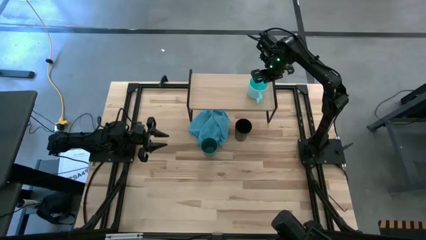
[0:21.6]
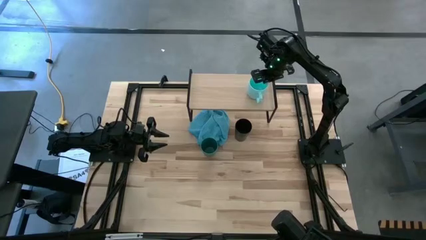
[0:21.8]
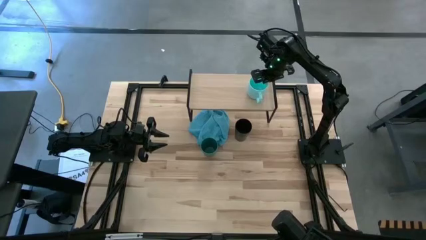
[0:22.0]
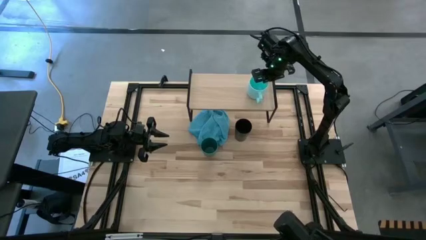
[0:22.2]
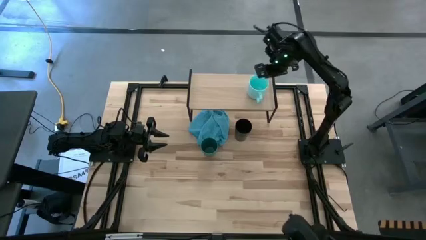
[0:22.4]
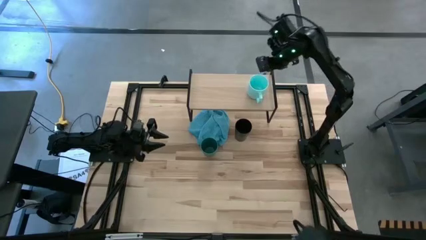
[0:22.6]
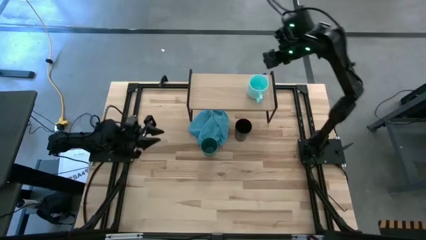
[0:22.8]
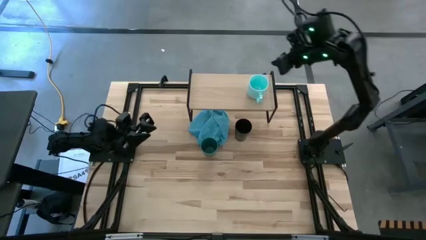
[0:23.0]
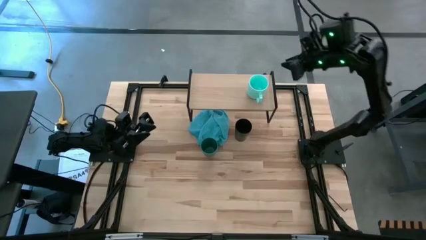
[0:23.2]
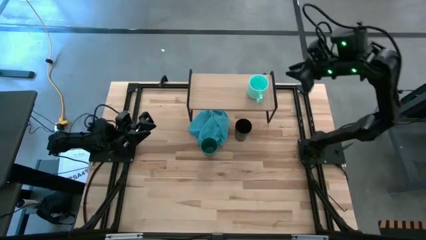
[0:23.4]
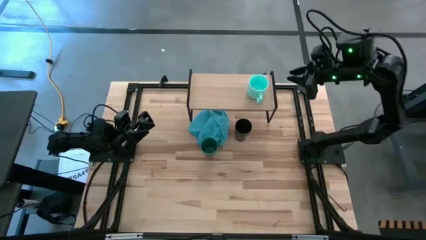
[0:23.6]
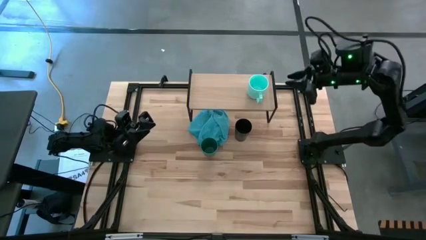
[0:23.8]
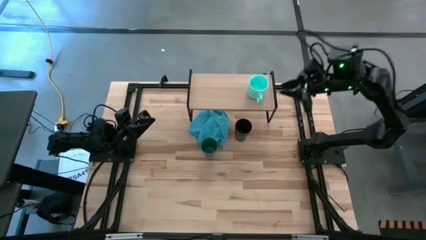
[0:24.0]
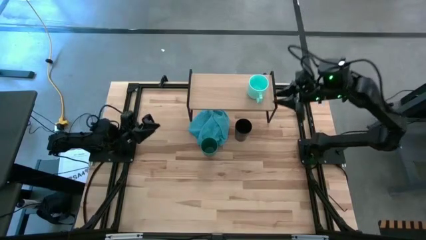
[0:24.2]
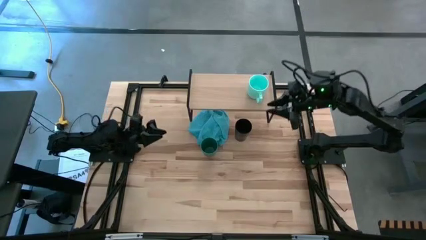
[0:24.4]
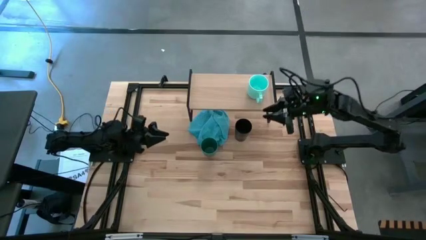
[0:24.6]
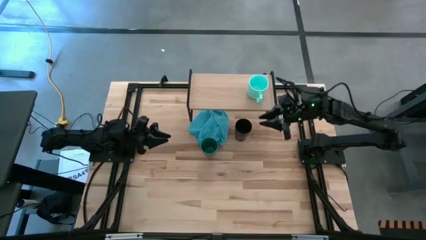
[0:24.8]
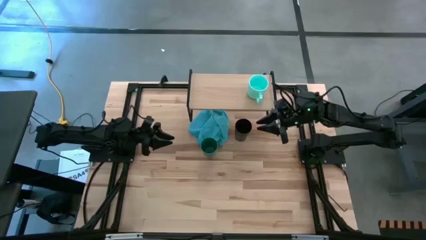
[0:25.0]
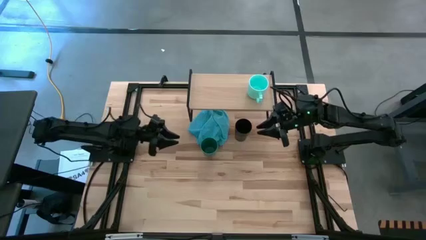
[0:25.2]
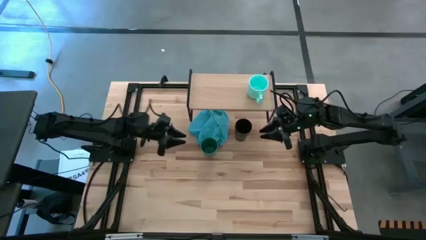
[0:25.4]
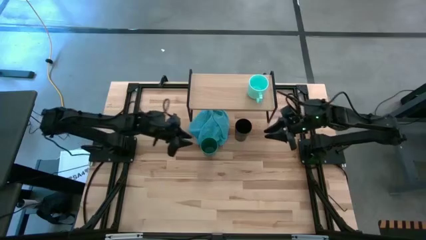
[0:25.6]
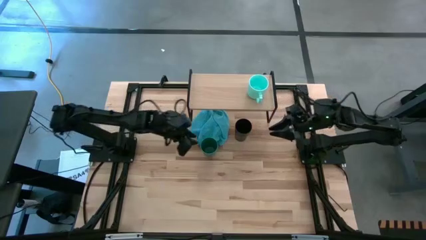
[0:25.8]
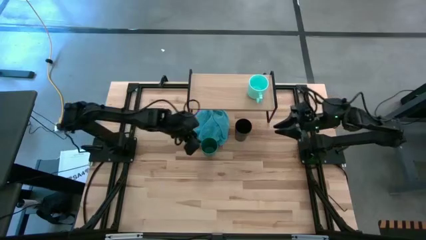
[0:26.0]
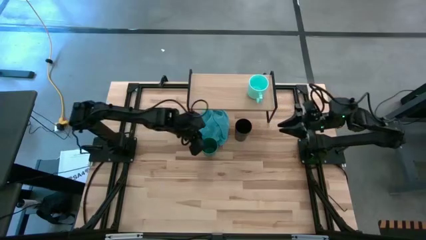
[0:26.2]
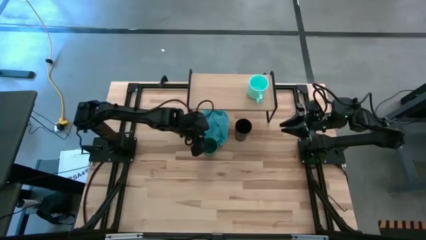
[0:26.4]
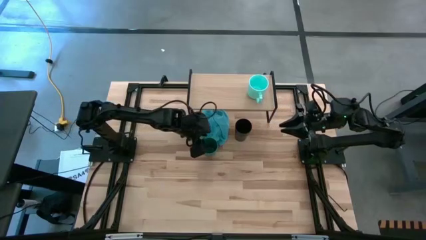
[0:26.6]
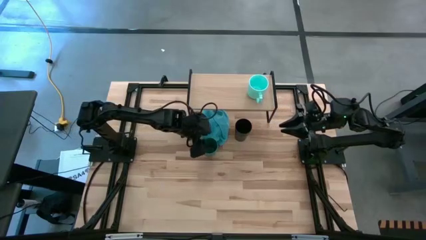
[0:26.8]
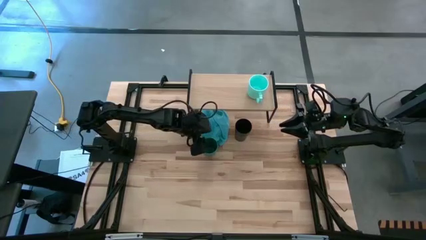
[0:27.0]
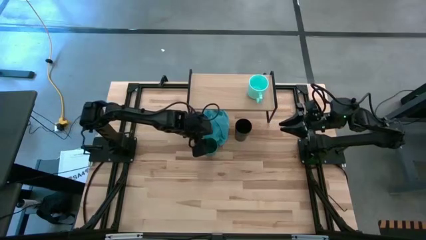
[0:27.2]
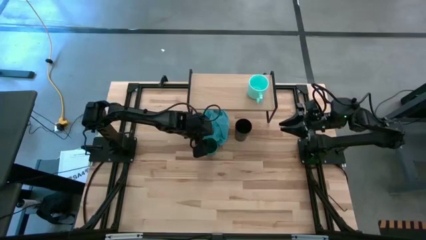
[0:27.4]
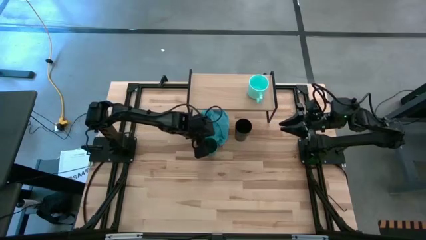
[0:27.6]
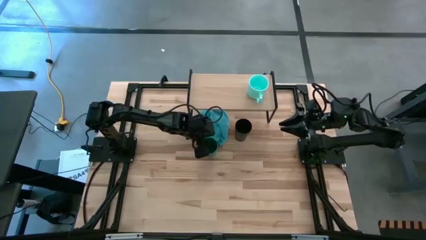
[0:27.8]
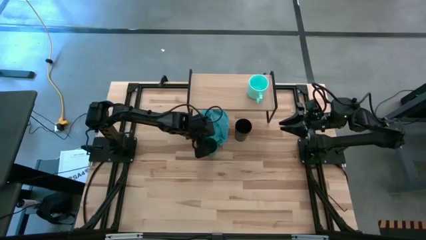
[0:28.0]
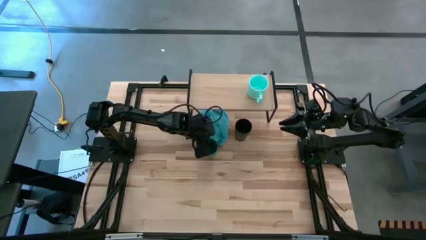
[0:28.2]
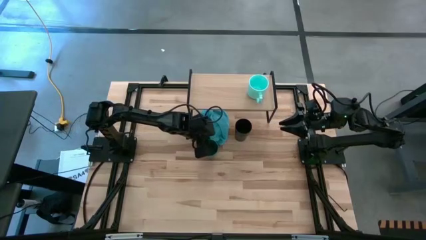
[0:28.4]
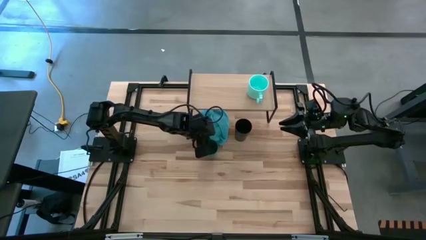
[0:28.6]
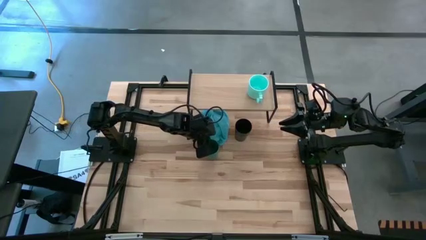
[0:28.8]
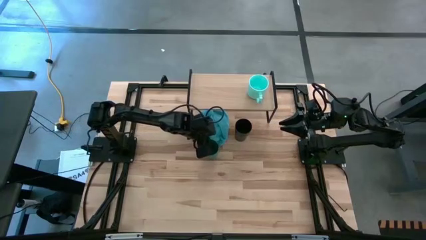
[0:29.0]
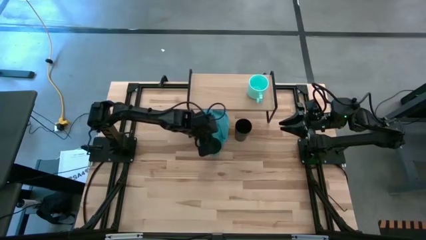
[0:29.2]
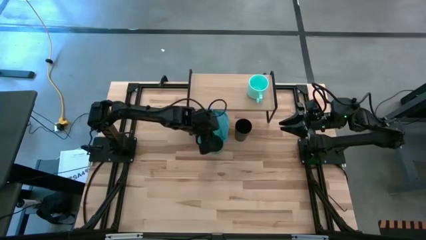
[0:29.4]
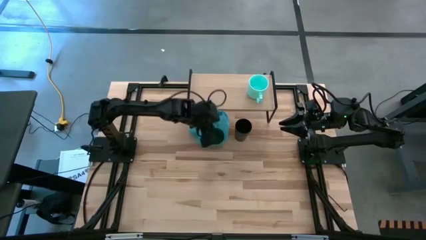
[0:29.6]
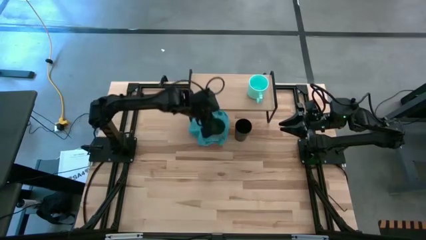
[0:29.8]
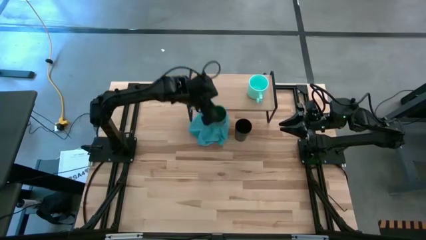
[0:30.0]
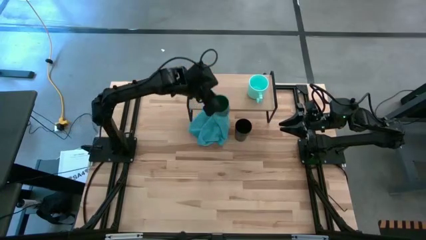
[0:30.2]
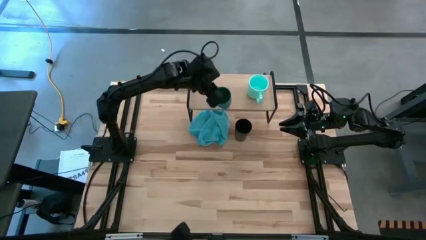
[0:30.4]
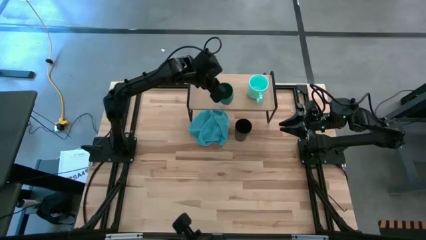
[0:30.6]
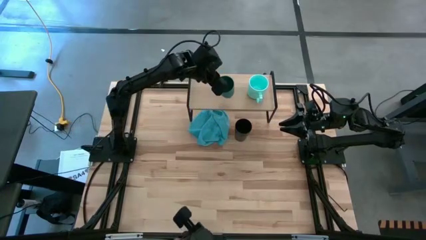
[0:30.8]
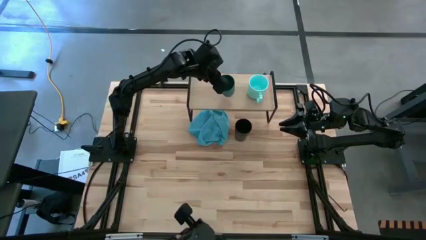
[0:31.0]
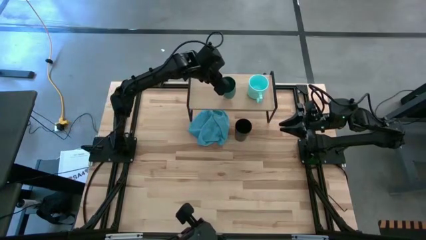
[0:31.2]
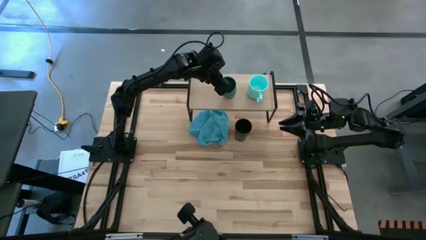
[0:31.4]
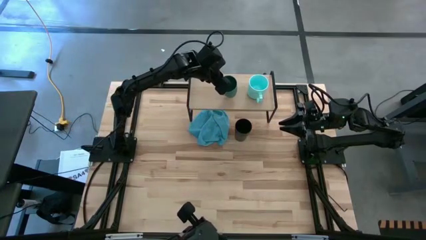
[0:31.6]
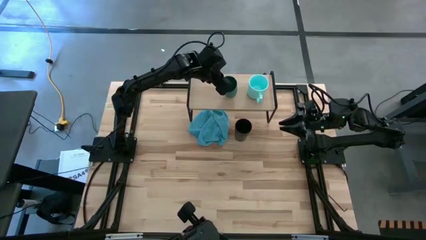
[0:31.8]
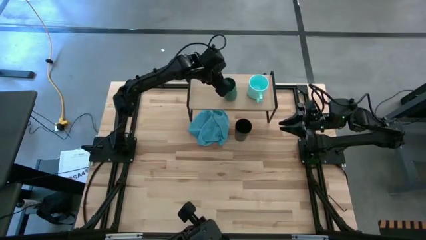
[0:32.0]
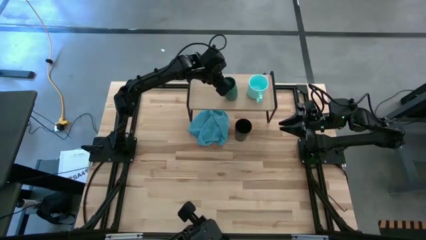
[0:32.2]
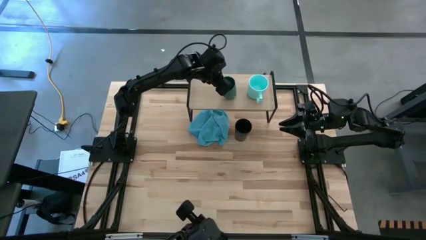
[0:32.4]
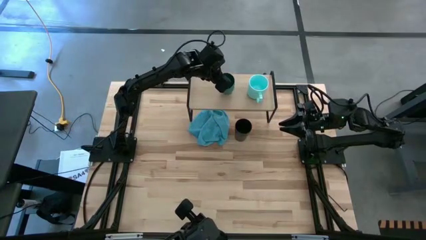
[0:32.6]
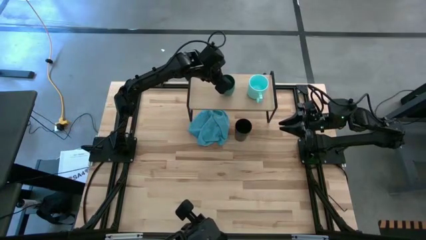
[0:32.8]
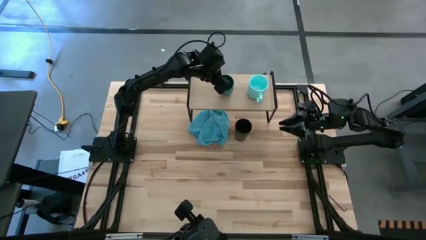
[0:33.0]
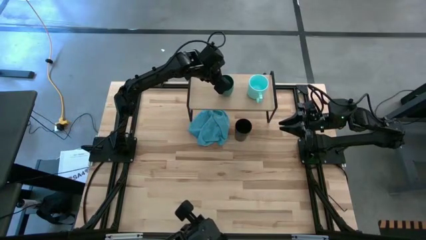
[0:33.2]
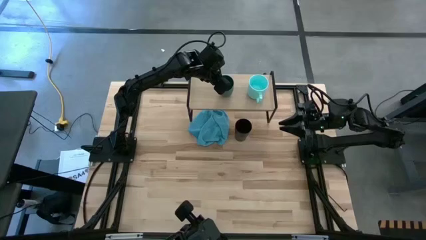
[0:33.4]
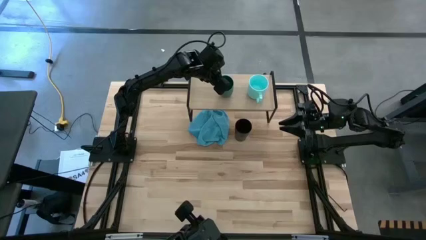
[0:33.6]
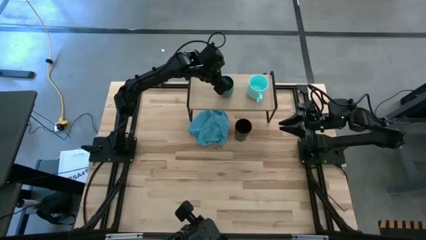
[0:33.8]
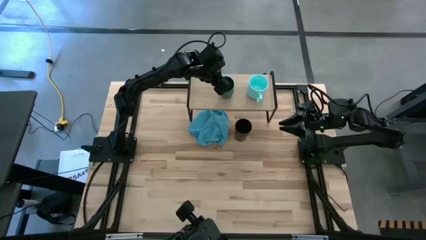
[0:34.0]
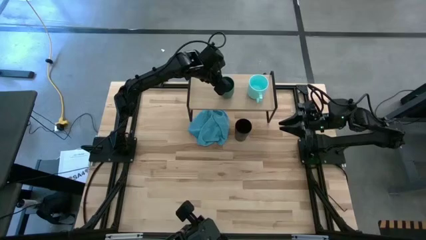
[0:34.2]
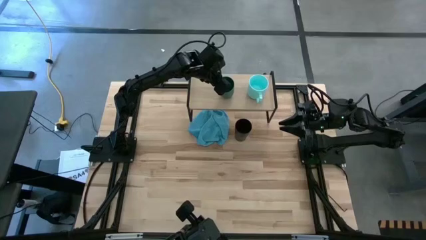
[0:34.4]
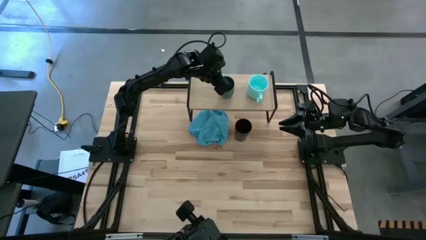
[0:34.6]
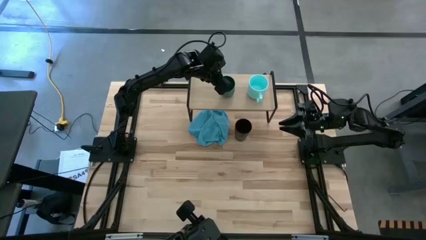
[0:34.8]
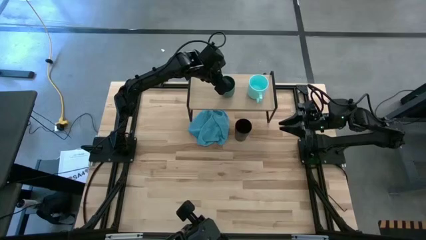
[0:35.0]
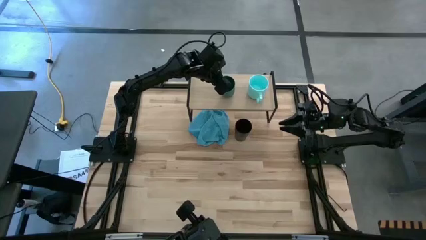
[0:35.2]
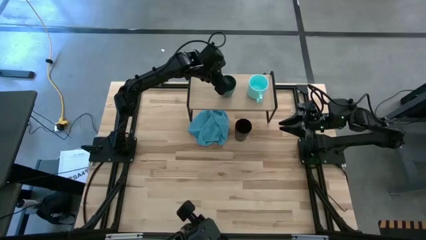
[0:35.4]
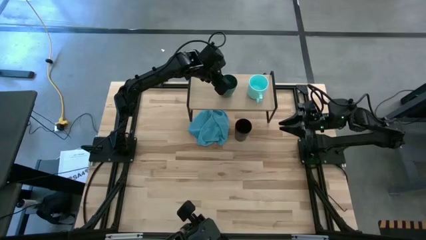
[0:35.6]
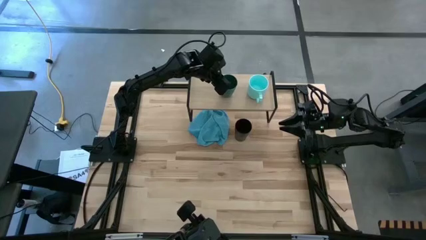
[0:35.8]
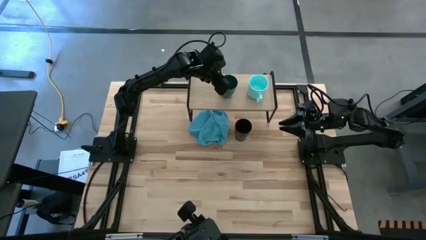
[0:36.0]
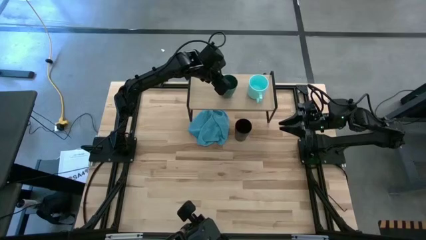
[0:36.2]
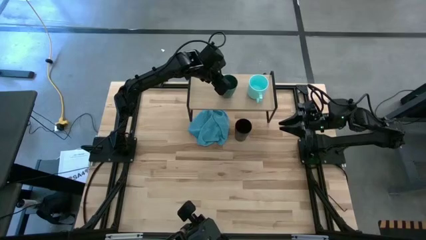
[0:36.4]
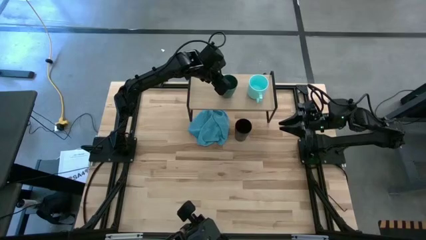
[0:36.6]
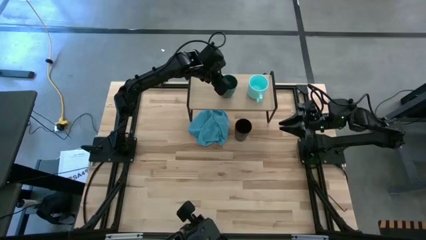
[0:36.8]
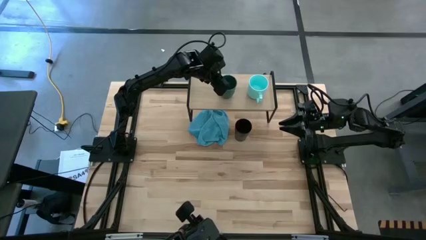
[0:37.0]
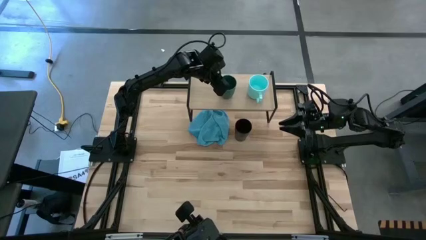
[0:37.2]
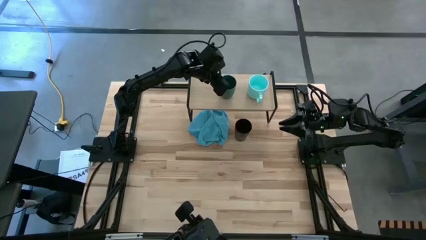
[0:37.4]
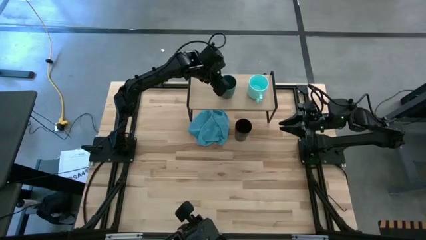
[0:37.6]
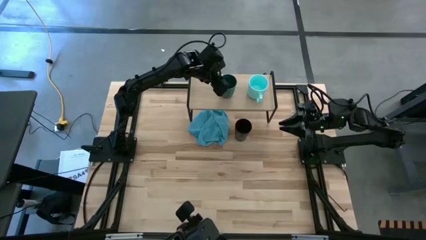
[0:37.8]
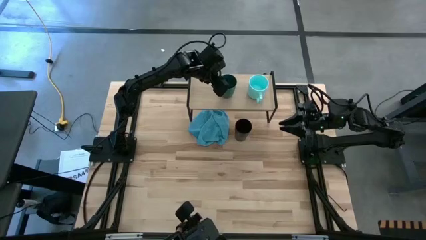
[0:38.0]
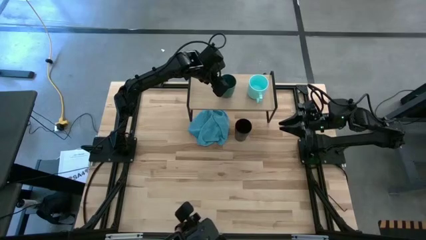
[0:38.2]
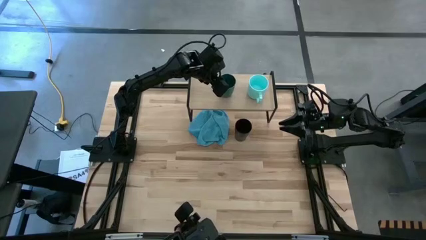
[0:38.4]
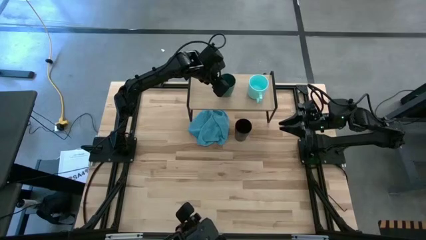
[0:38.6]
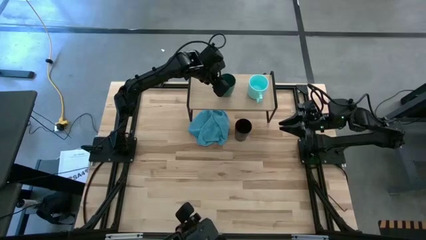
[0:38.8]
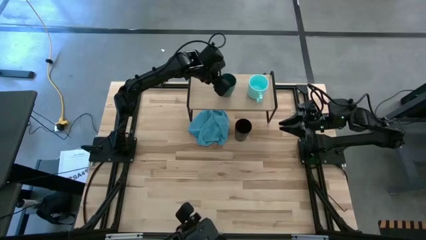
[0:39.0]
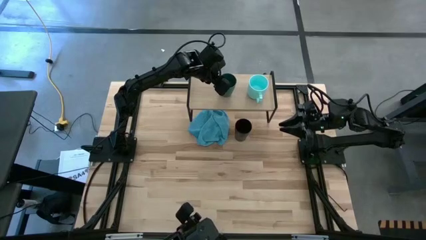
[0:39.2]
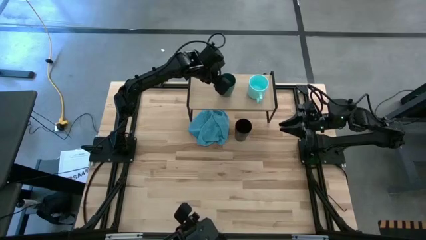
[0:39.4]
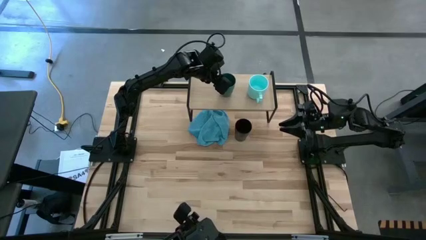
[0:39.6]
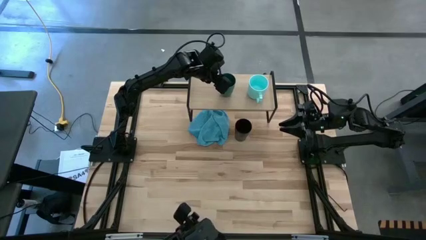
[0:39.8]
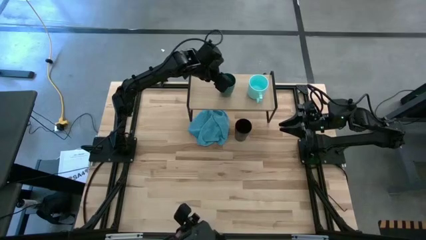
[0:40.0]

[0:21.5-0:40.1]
Task: Stack small to large cups/mugs on shelf
Put the green cup on the shelf
